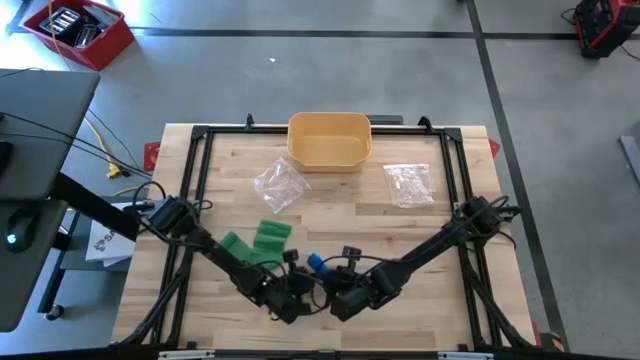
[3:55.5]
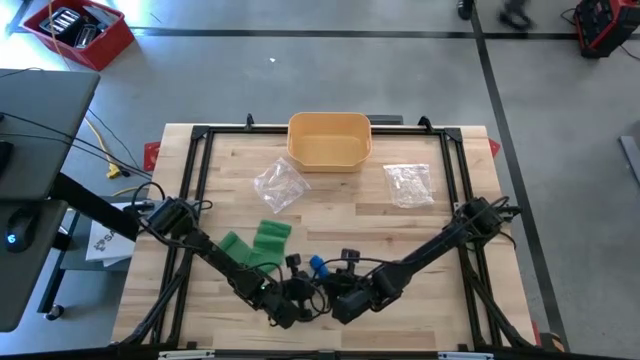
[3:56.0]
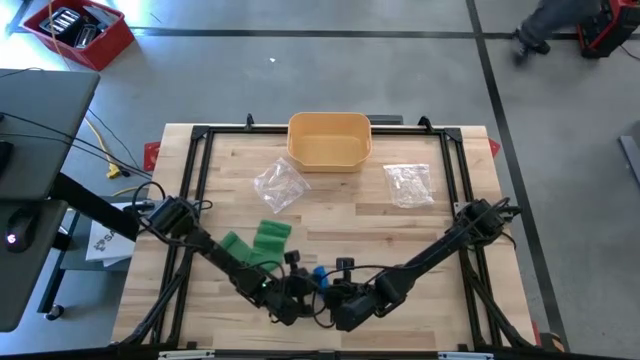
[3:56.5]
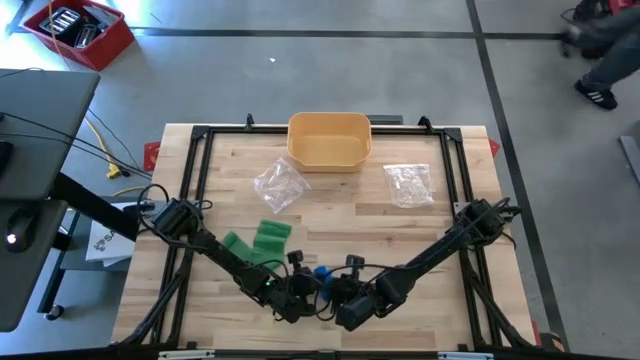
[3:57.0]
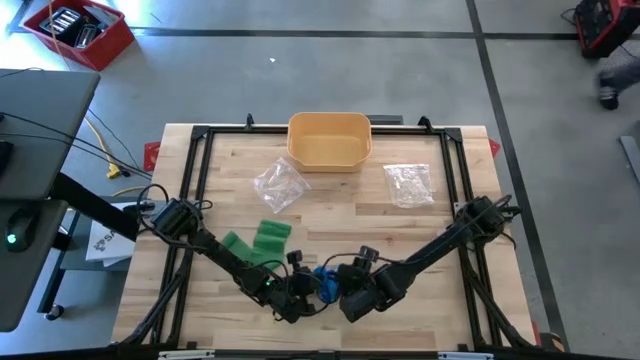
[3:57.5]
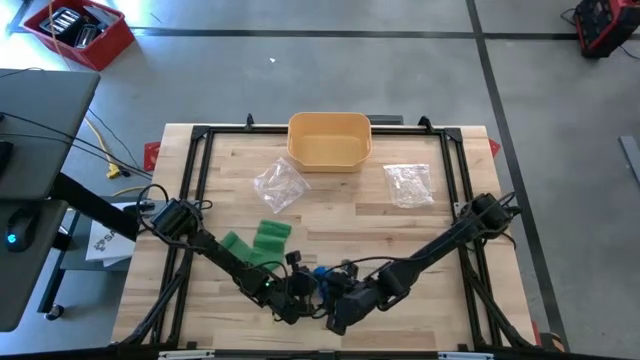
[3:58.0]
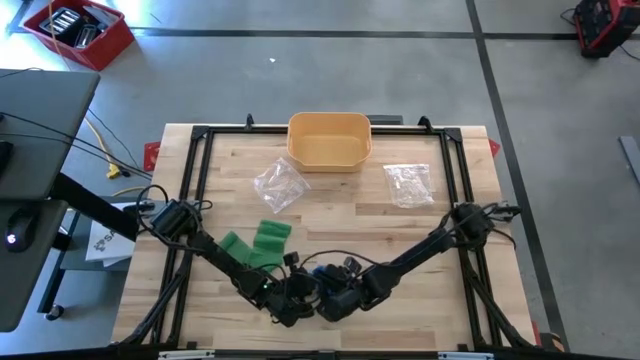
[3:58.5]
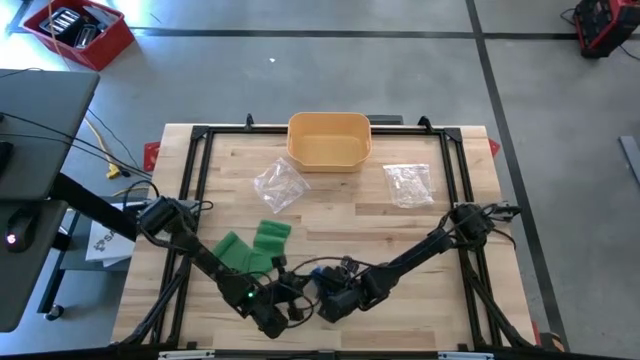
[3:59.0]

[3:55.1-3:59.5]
Task: Roll bandage
Roll the blue bandage

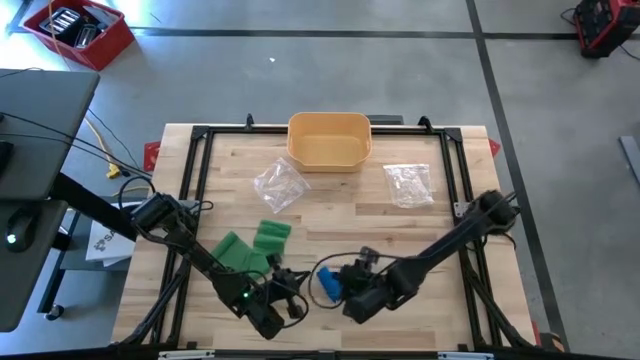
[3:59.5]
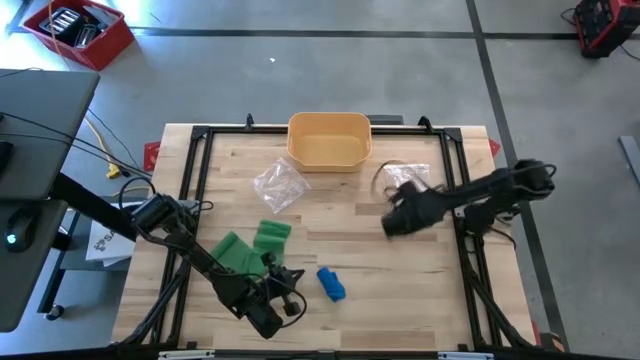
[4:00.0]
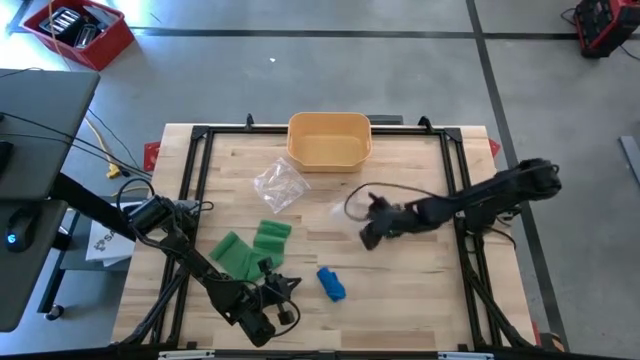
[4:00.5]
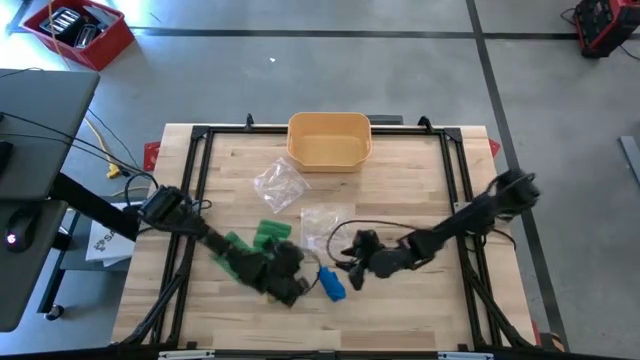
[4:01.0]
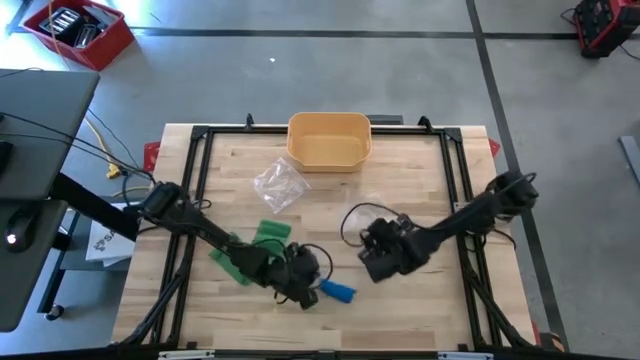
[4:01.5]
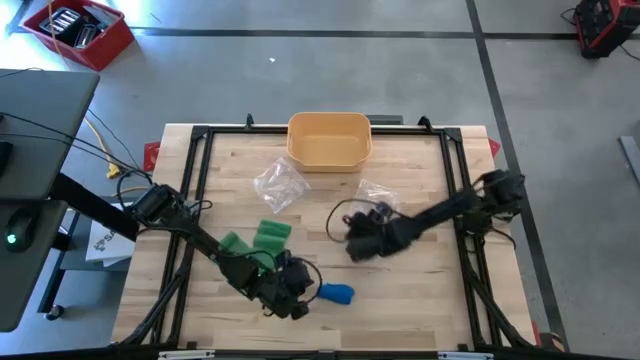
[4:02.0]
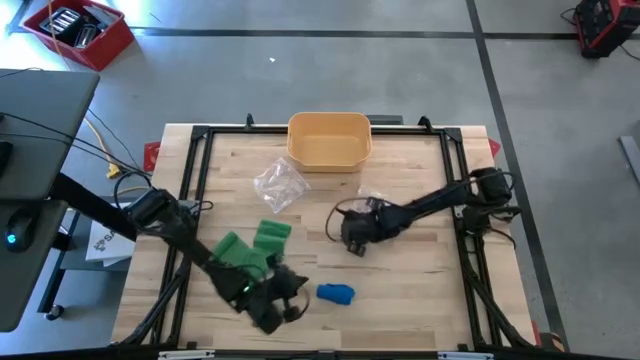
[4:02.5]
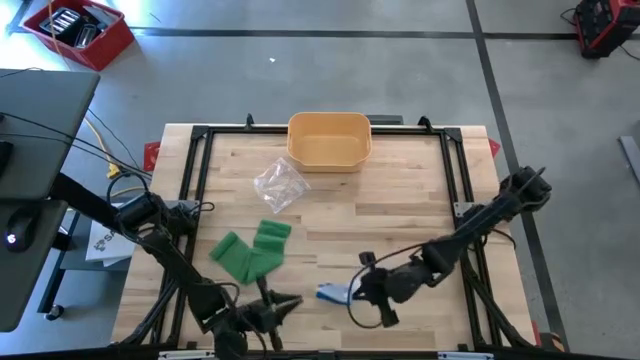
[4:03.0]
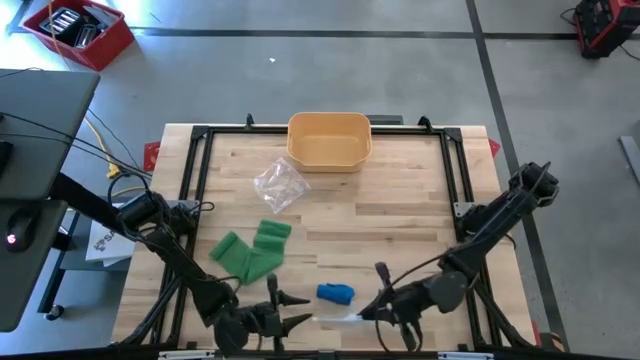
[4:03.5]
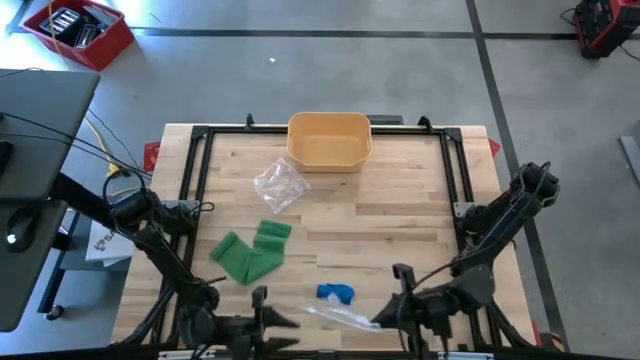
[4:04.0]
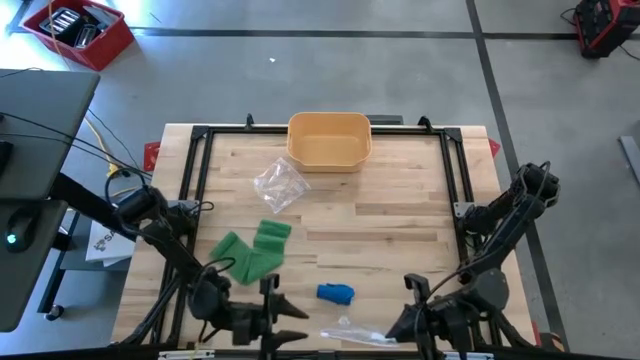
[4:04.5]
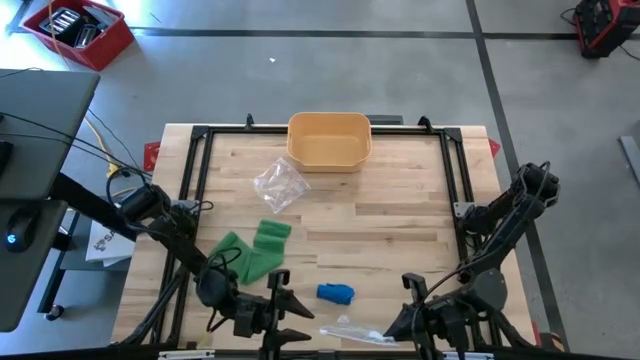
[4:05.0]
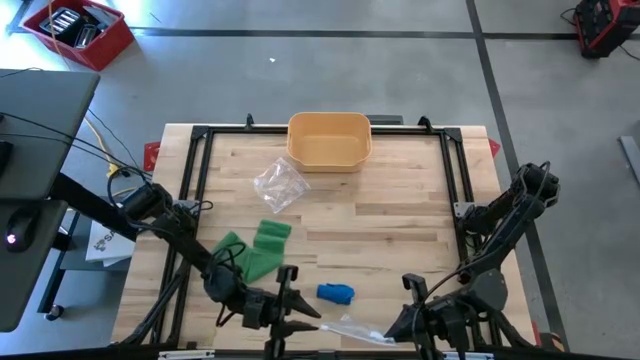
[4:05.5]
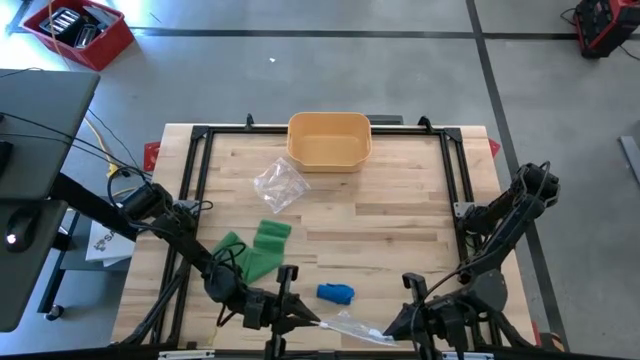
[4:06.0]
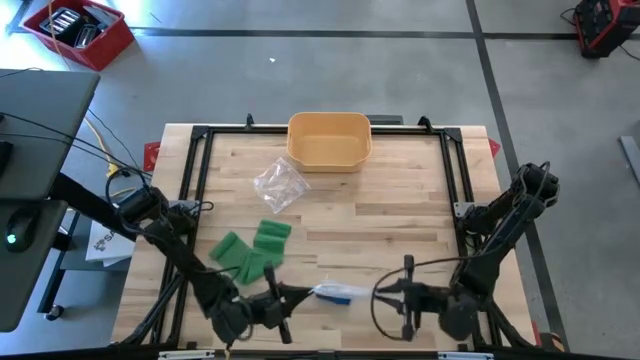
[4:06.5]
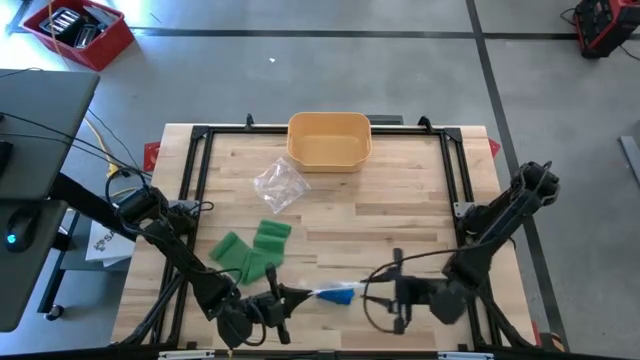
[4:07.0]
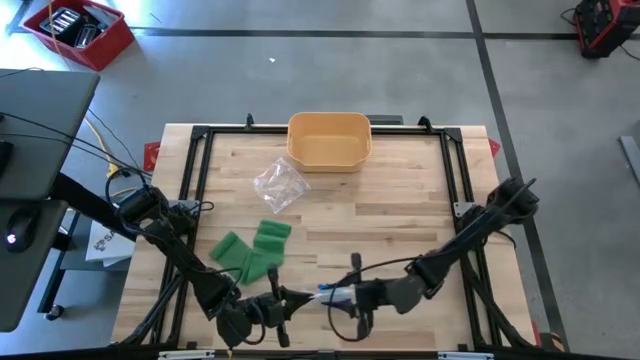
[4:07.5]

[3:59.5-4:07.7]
Open the right transparent zip bag

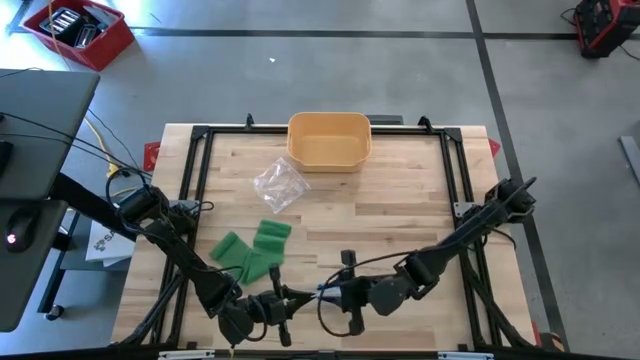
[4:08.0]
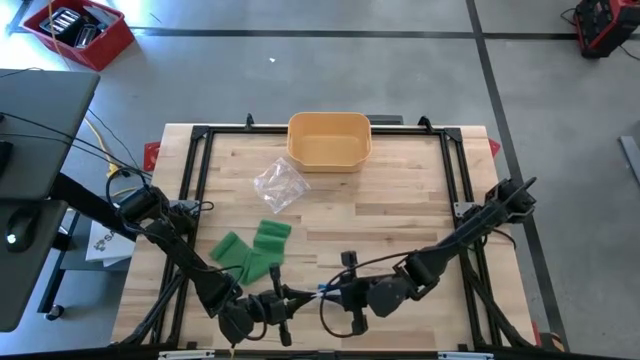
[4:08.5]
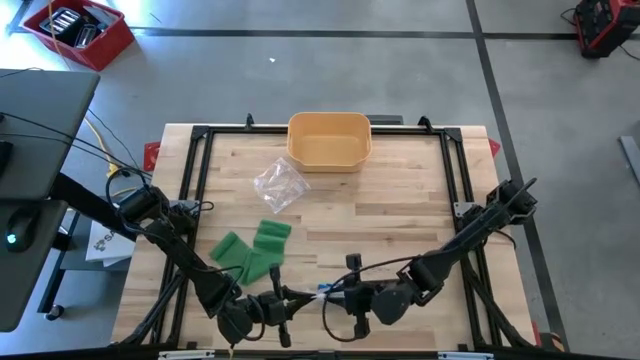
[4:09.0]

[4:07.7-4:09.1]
Open the right transparent zip bag

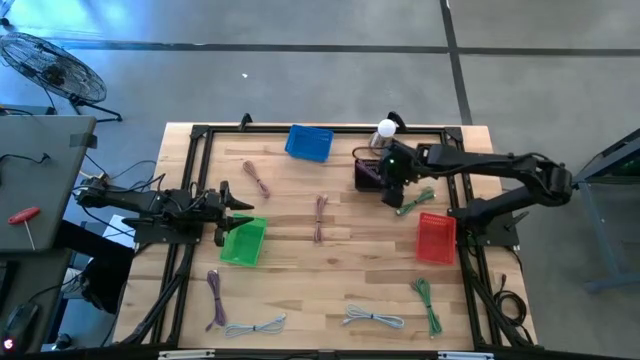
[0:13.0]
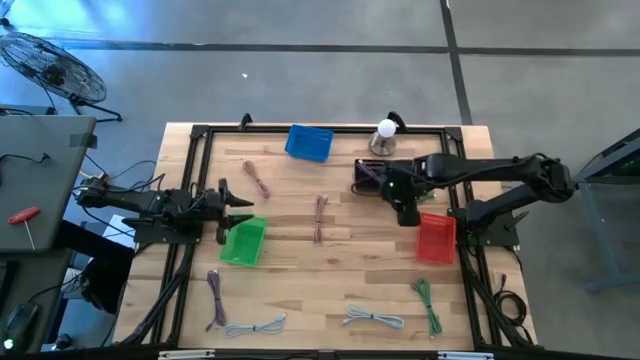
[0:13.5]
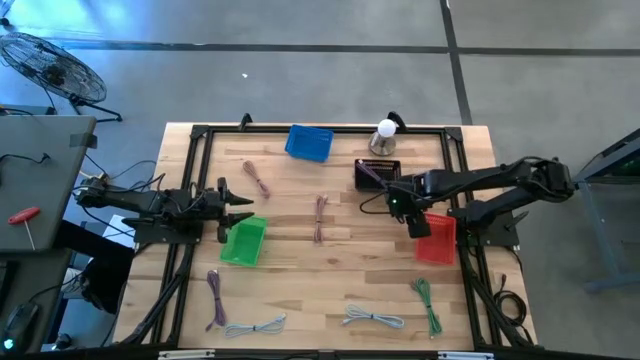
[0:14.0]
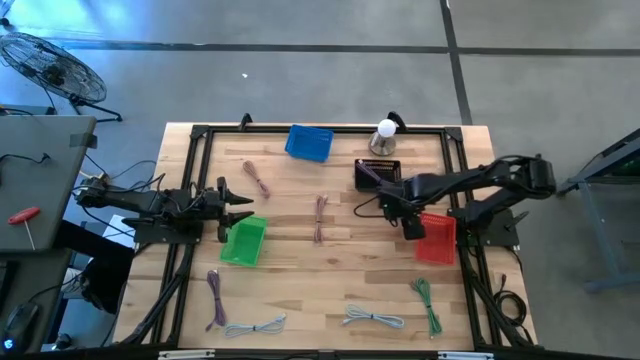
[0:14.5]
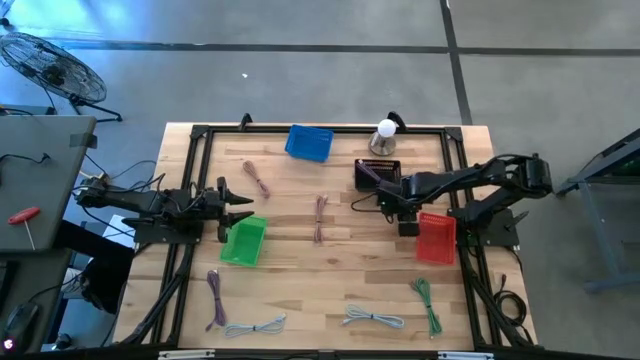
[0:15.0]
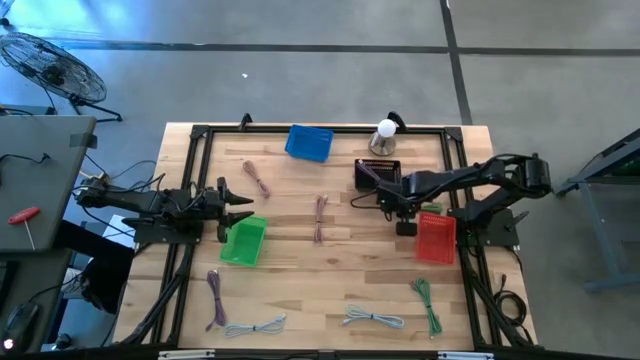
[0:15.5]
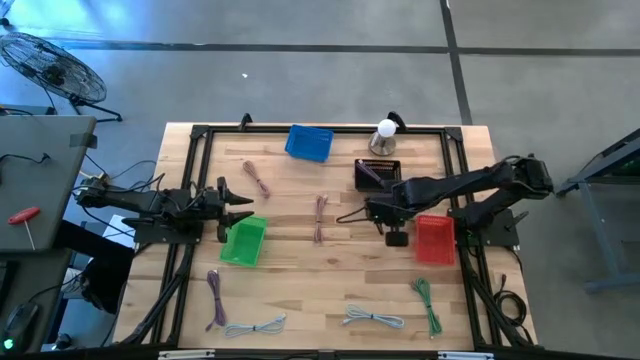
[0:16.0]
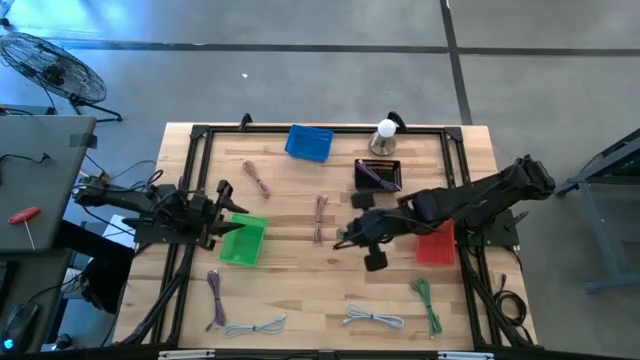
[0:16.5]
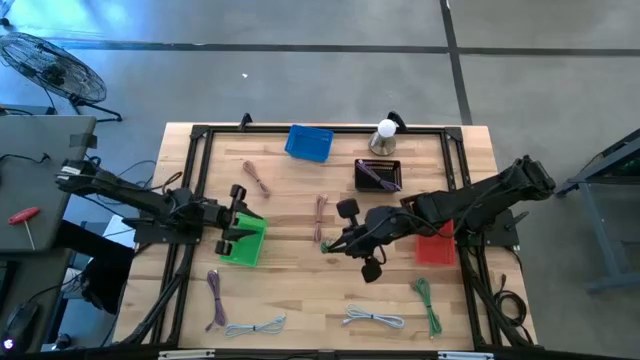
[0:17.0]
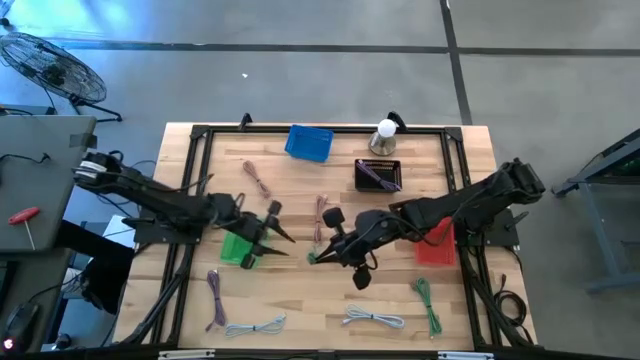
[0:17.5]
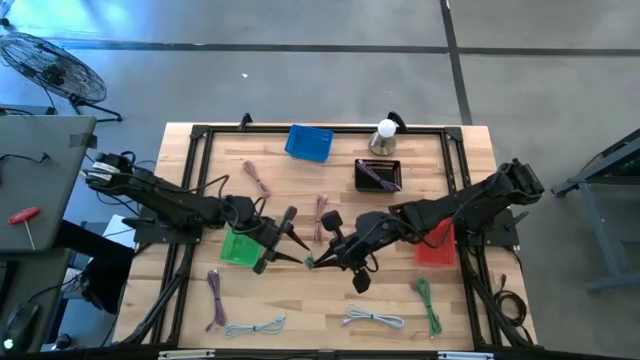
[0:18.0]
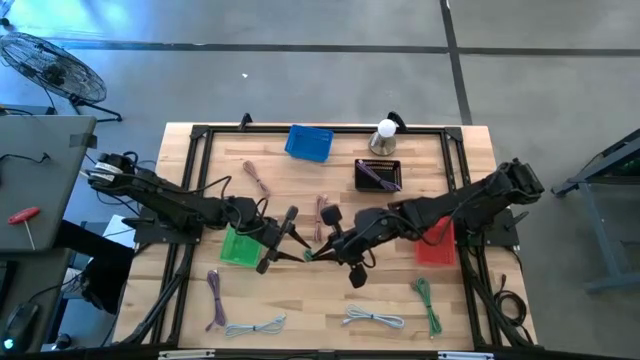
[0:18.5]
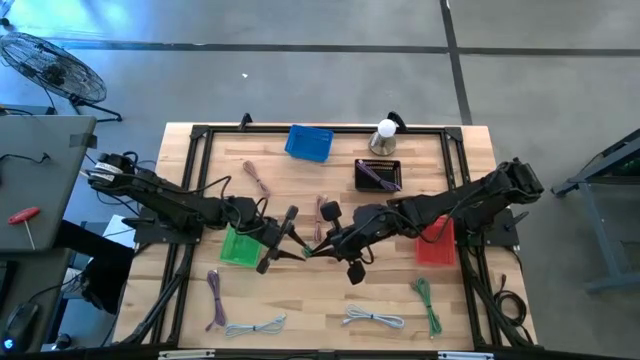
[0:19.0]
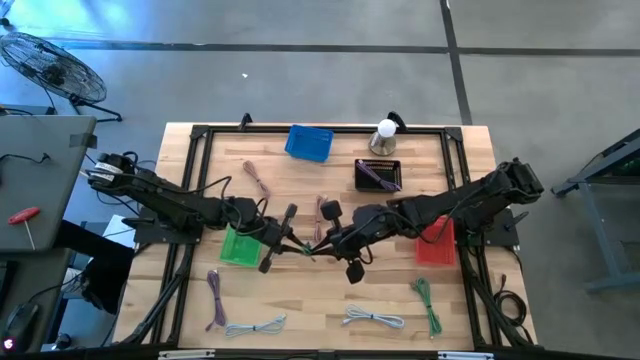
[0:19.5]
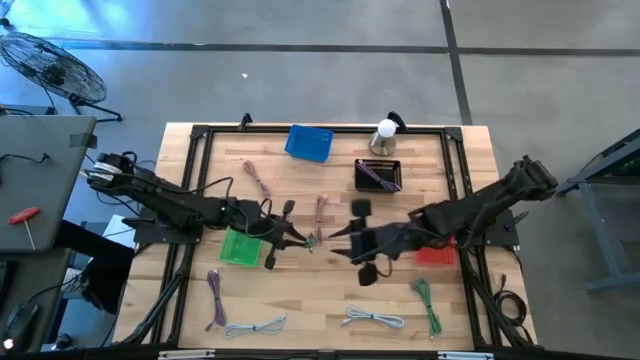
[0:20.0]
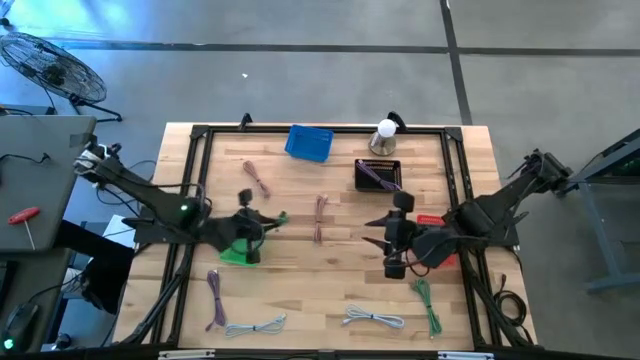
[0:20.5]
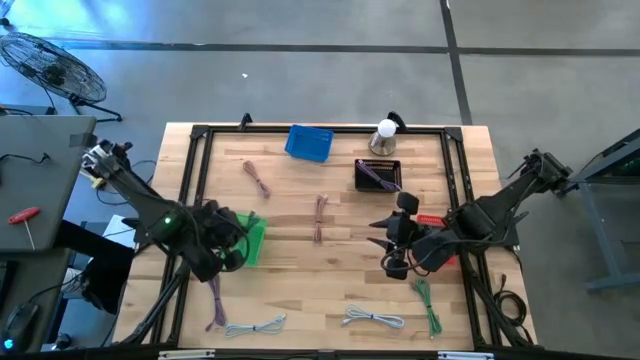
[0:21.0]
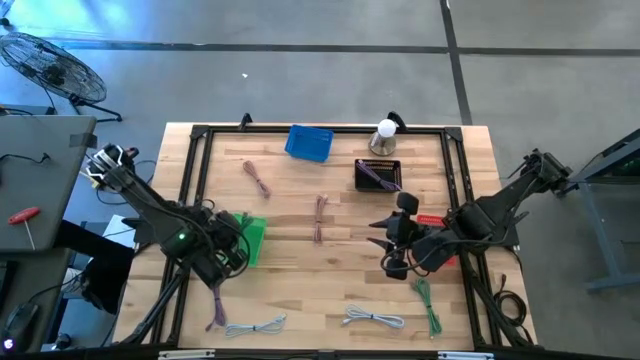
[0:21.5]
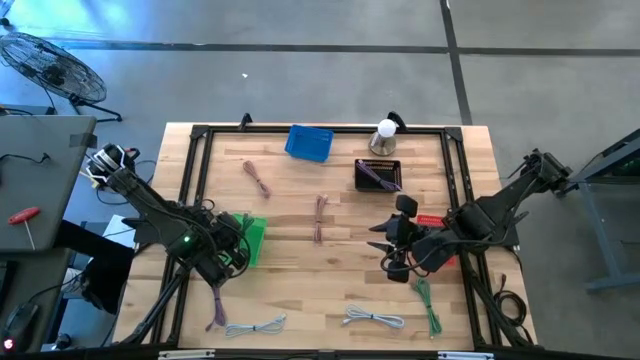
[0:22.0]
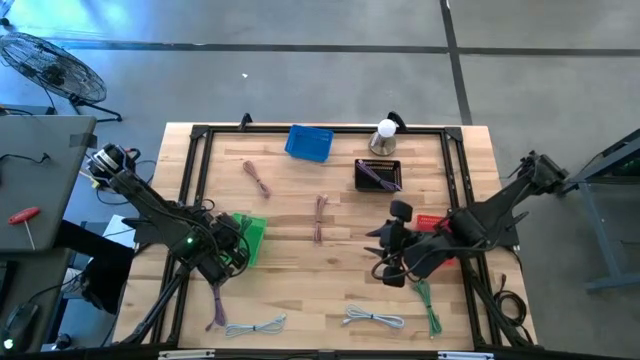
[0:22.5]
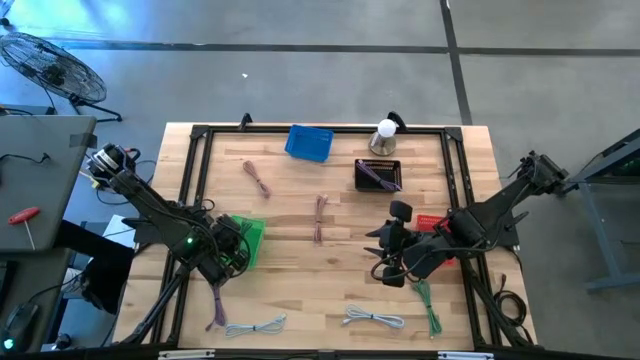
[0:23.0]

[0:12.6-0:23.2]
Task: Pick & Place USB Port
Put the top green charger cable into the green bin
